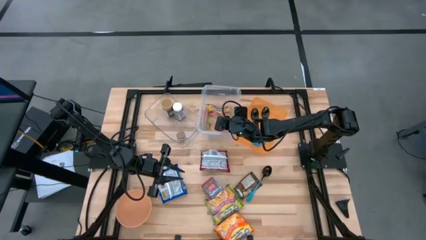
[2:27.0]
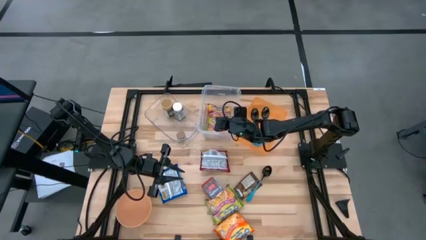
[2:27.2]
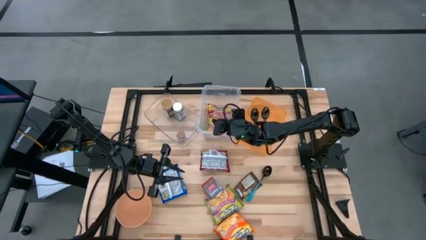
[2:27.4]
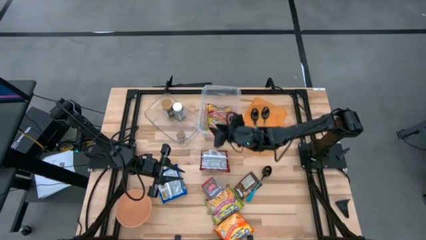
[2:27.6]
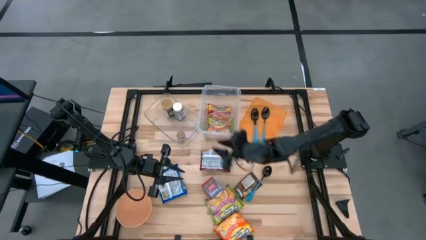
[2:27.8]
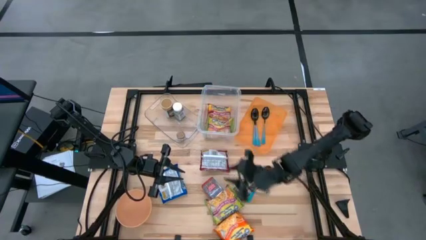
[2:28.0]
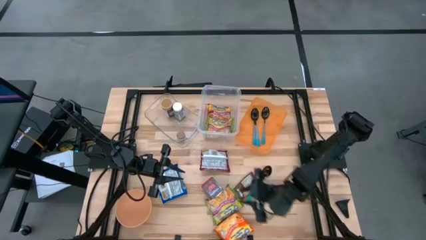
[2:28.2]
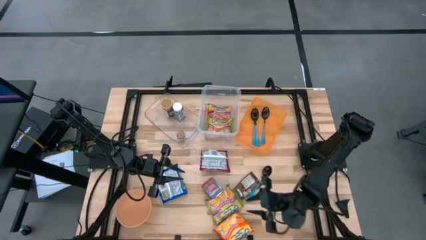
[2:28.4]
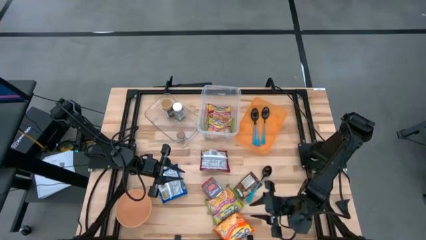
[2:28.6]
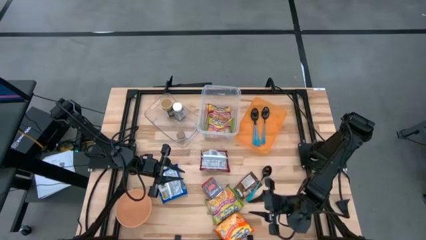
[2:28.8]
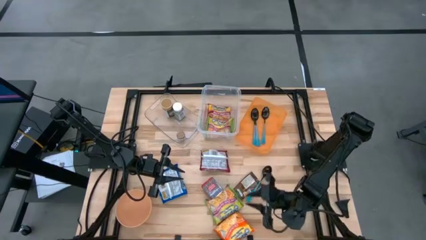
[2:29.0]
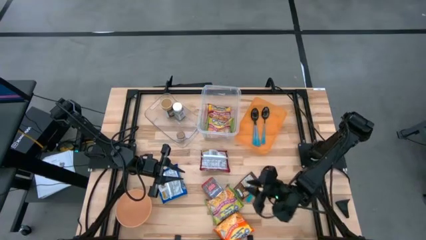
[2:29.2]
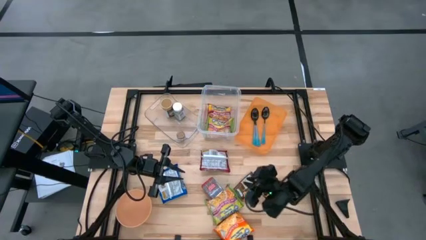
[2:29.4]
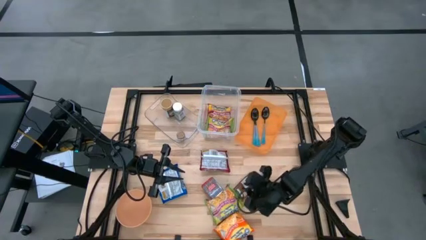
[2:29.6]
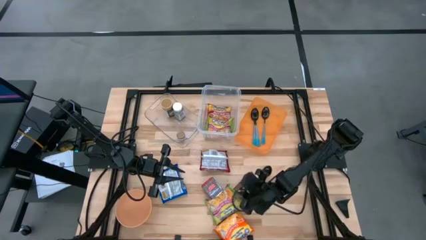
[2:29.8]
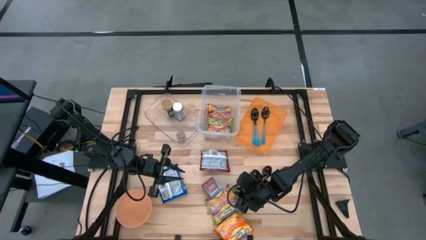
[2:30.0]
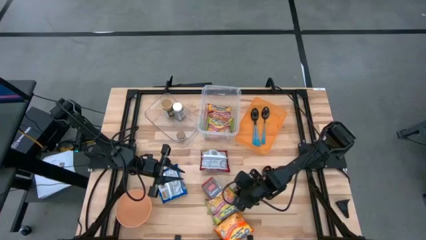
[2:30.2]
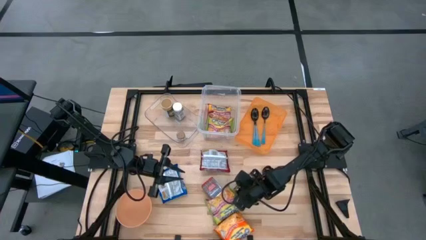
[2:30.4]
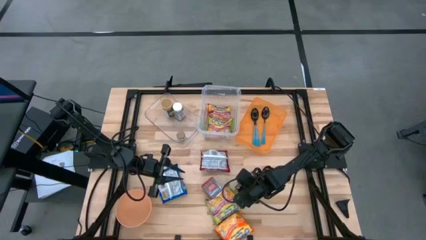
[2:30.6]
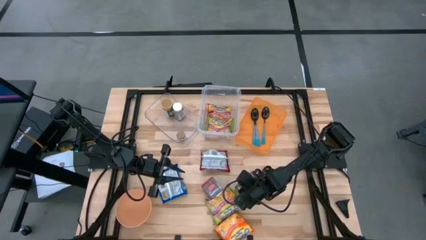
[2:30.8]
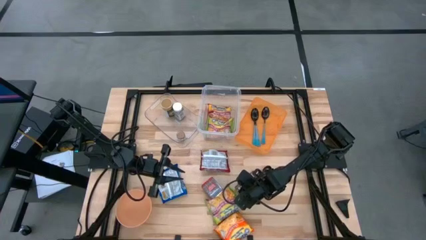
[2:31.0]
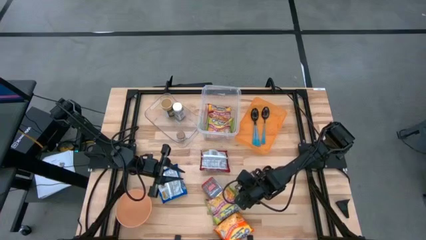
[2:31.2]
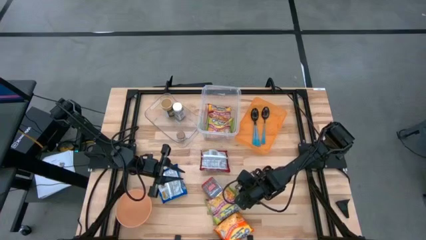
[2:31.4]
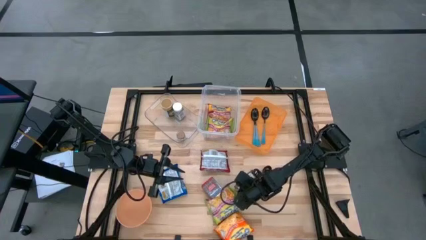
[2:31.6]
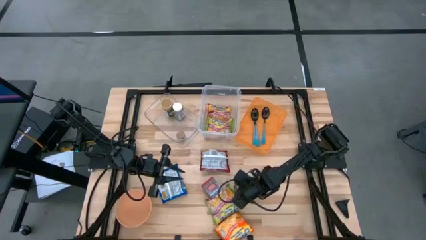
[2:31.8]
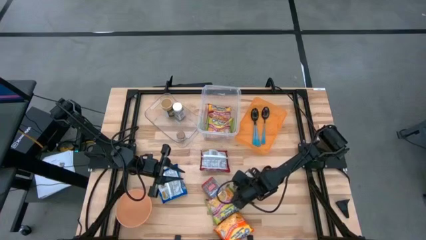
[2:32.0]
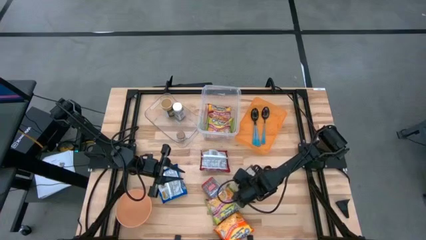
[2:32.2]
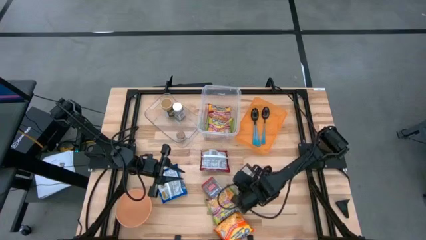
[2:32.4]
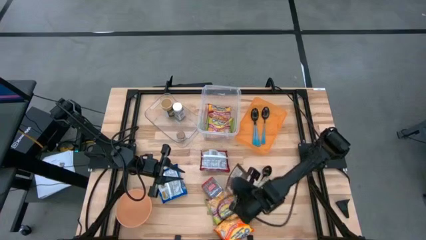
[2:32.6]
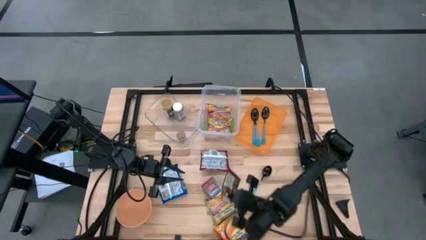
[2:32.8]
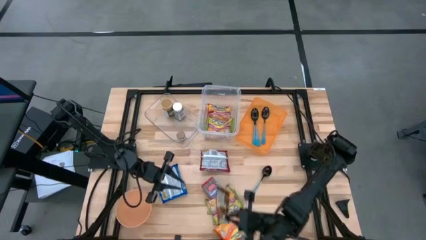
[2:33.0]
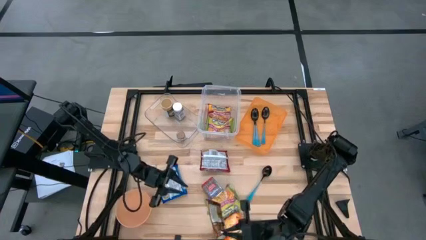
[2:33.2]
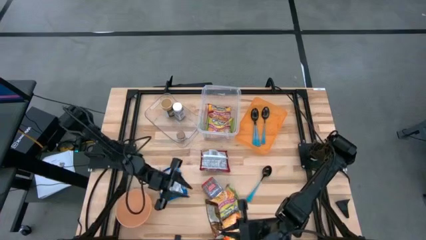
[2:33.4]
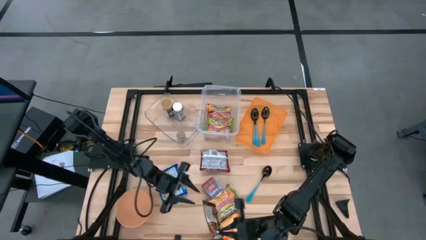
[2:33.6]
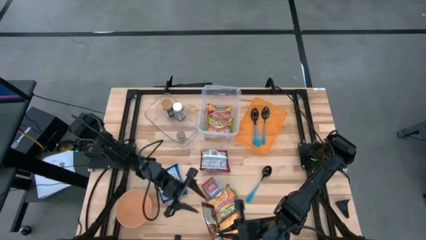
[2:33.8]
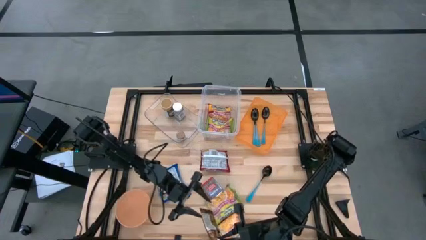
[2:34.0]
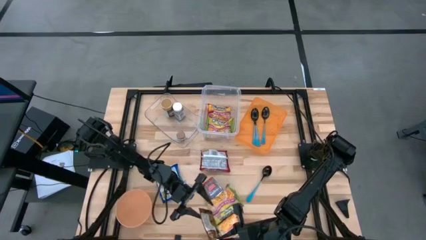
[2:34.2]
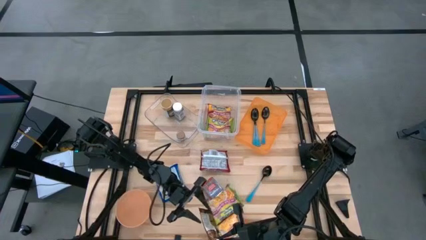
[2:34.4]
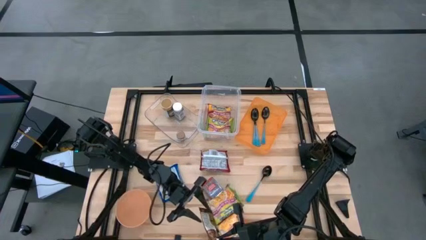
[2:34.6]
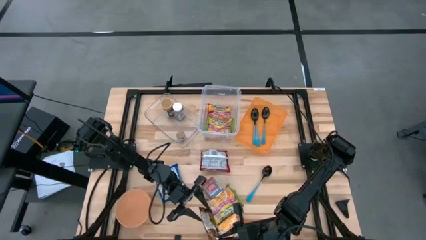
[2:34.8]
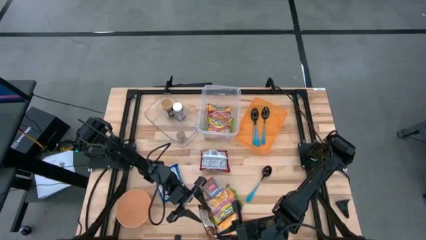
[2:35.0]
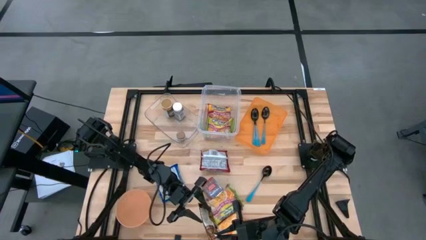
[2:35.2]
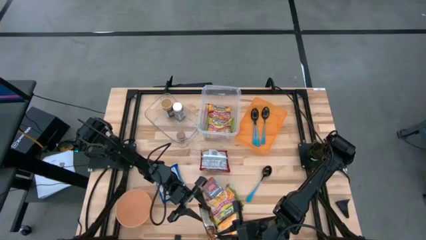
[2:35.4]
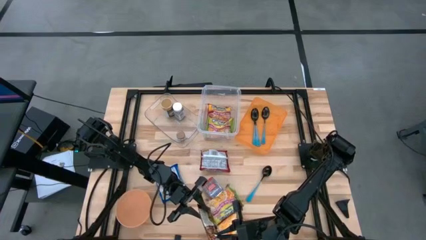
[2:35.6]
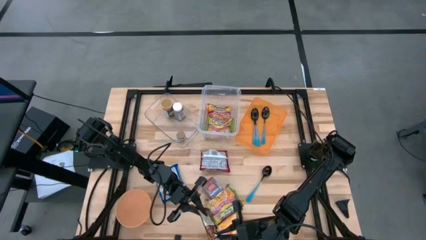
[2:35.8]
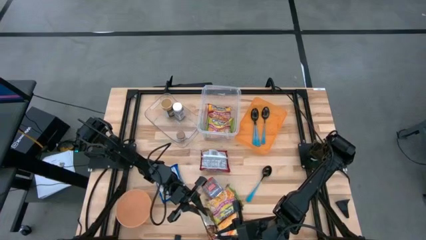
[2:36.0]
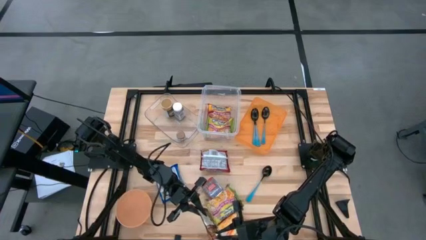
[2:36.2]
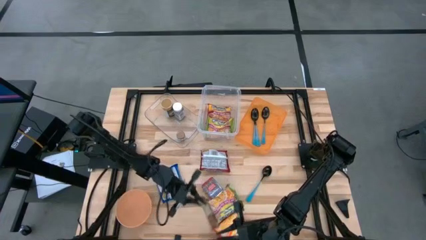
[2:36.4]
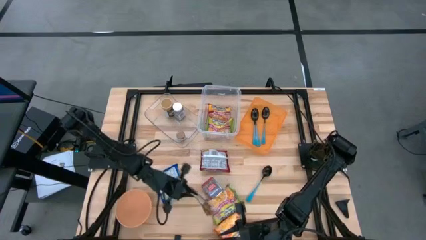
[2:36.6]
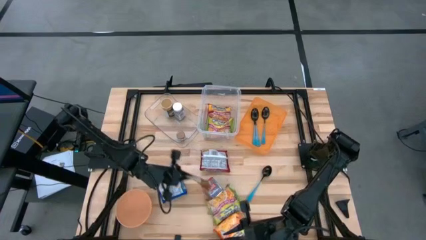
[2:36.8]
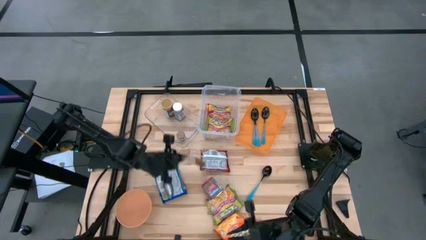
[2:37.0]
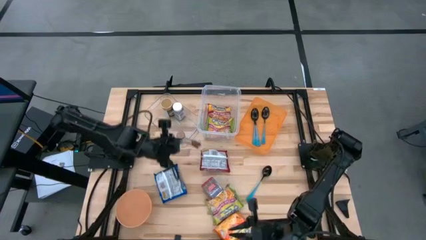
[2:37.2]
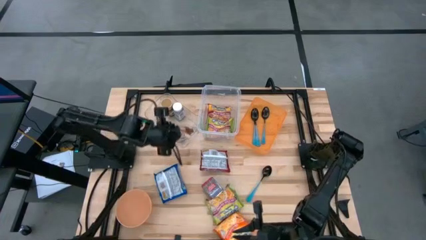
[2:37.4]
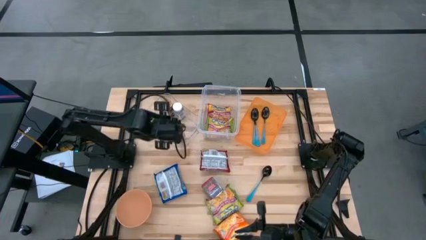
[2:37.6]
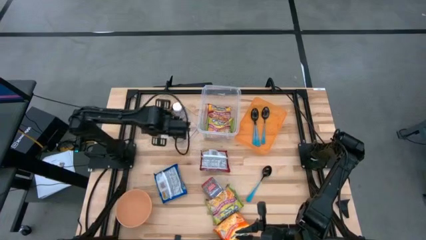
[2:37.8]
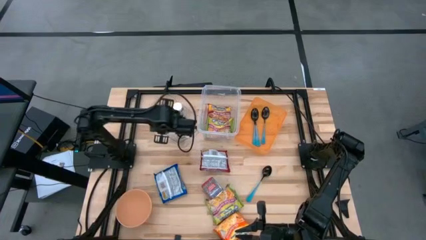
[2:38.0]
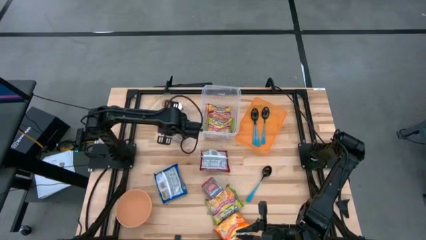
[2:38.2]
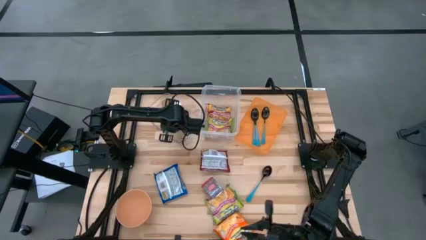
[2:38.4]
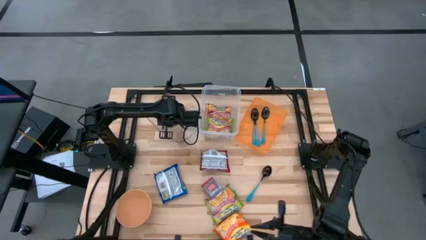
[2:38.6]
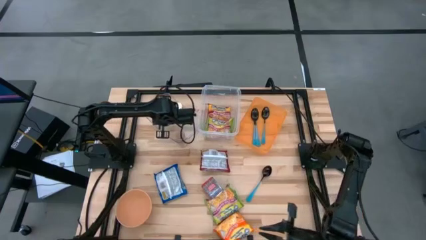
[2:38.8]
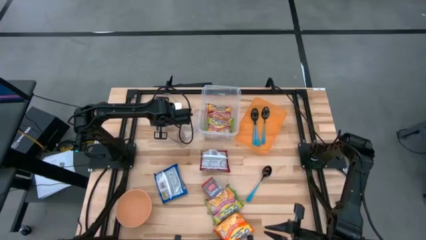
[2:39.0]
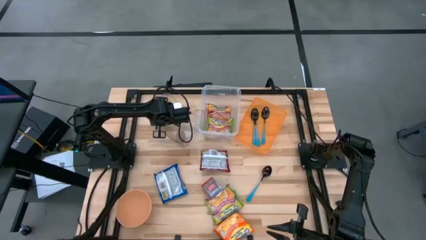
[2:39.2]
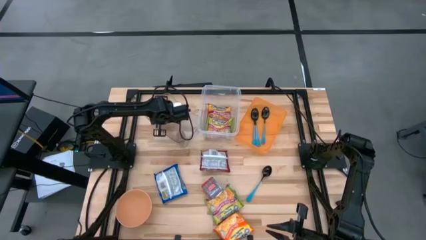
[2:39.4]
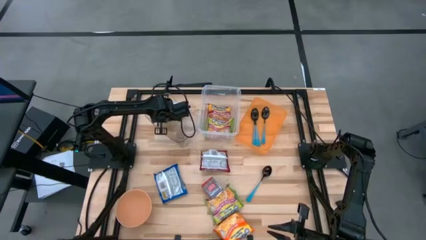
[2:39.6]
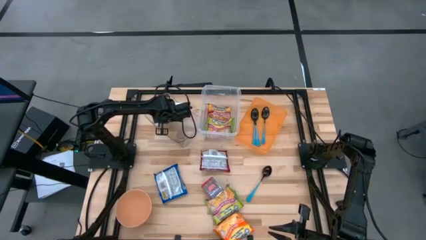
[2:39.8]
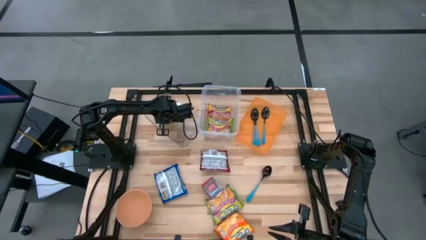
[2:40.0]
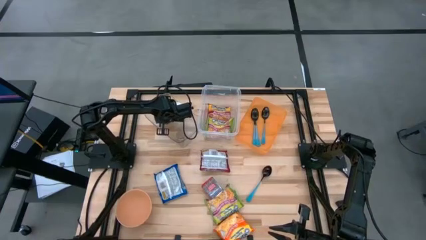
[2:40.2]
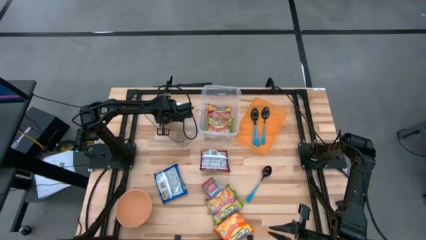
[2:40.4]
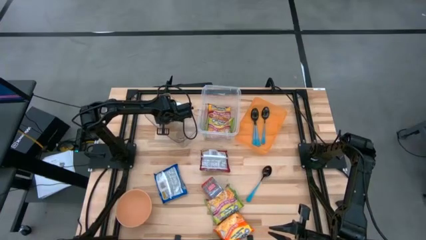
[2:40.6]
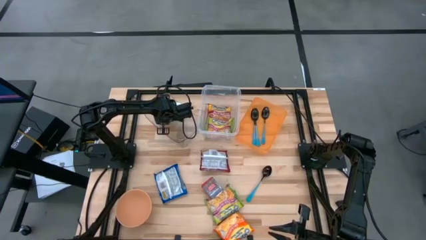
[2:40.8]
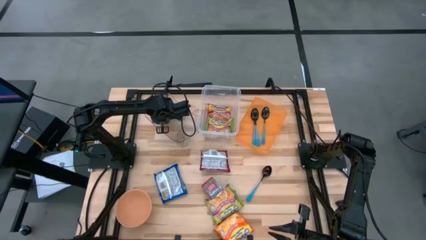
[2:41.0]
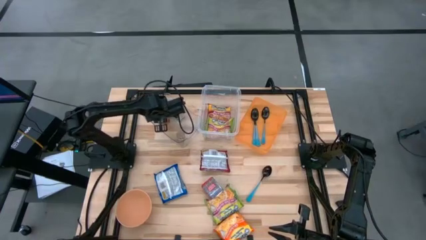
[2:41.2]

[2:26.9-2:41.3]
Task: Pick & Place Food Item
Put the orange seasoning pack into the transparent bin

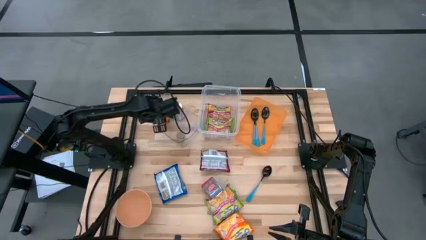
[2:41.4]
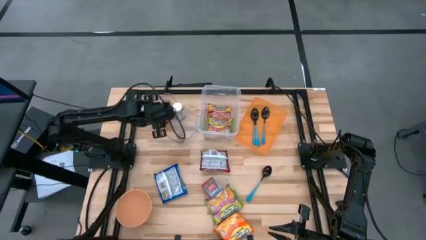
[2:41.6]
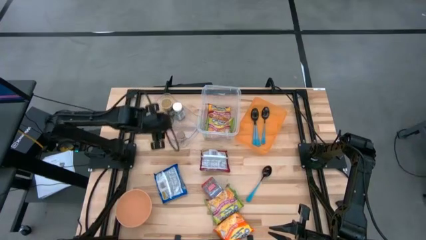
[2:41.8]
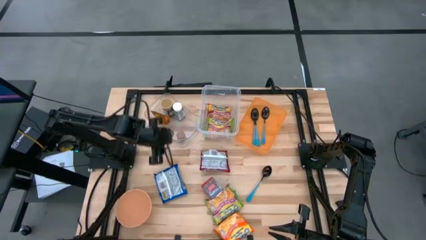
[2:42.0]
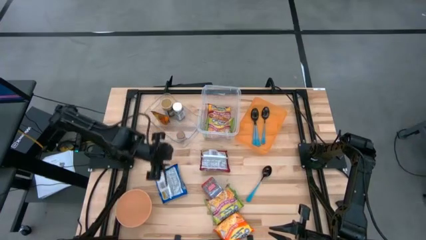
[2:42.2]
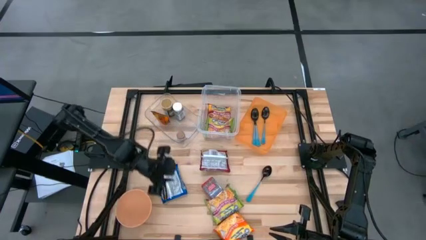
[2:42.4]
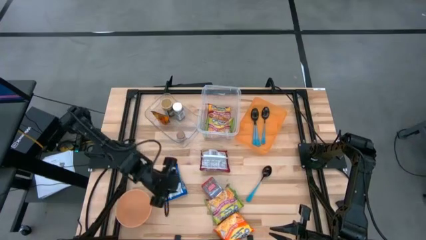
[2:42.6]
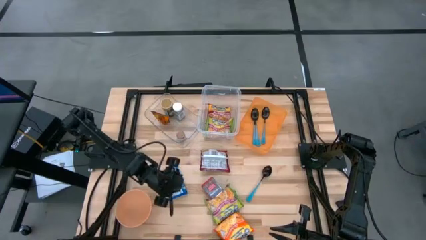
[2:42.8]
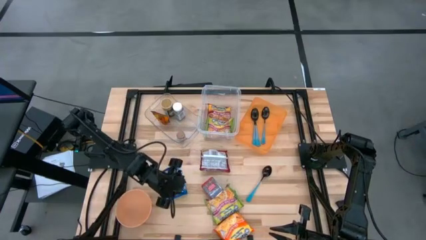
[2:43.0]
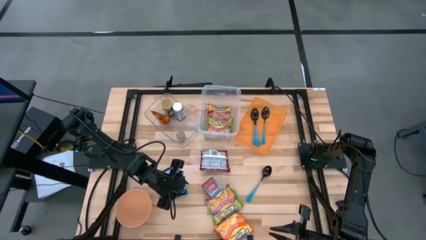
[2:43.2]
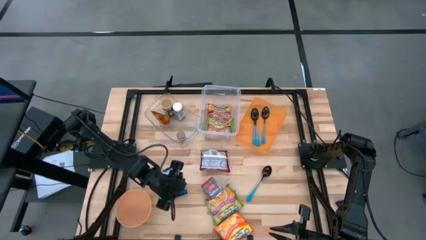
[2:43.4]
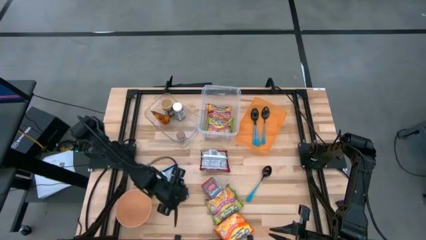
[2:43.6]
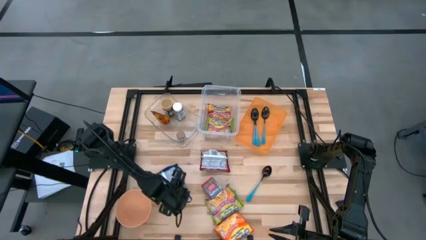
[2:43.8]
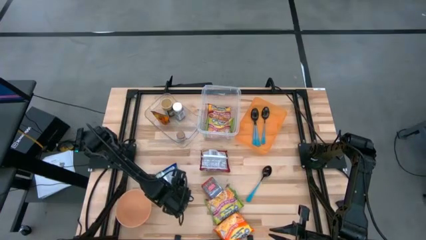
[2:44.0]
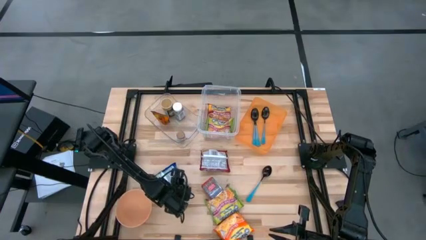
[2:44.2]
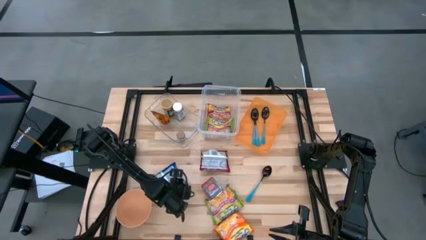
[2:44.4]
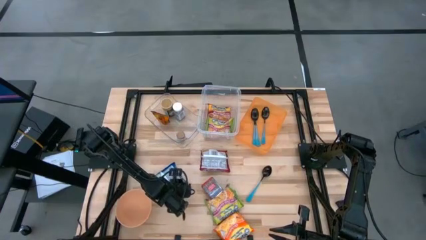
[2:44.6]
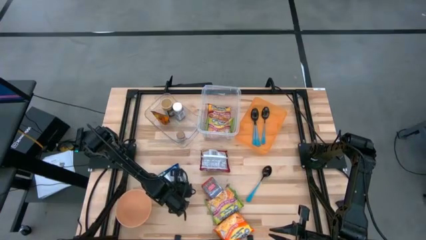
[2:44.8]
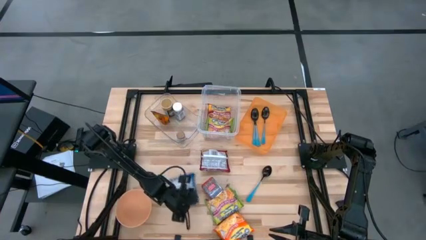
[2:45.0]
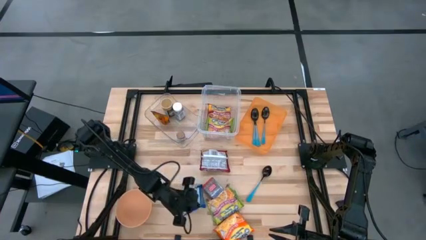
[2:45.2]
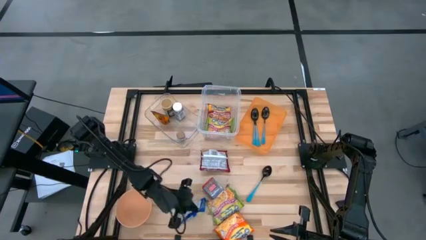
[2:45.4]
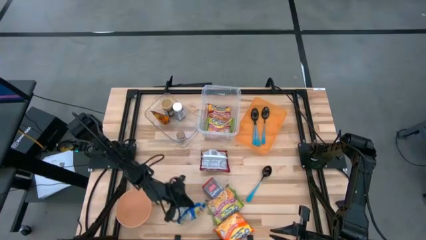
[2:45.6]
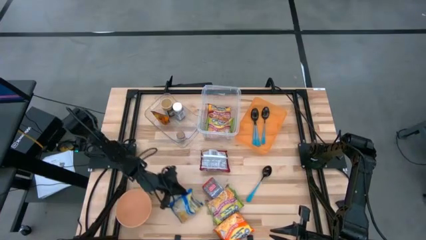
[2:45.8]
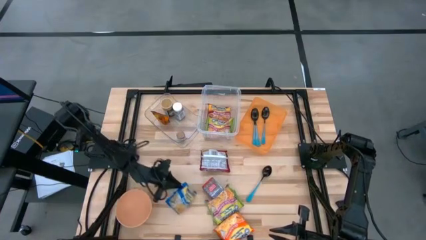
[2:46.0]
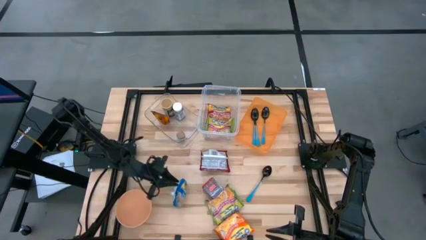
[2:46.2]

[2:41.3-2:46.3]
Put the blue noodle pack into the white bin
